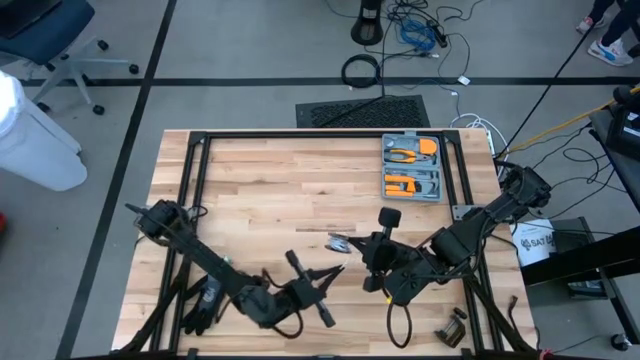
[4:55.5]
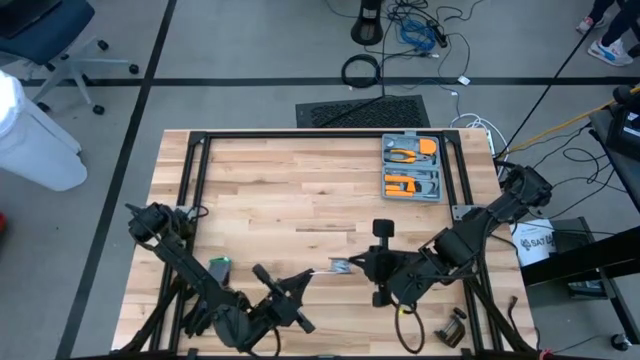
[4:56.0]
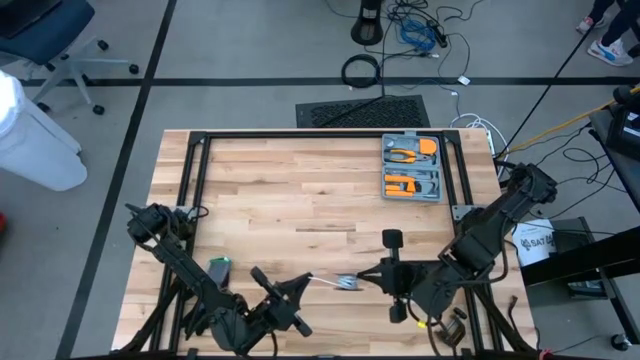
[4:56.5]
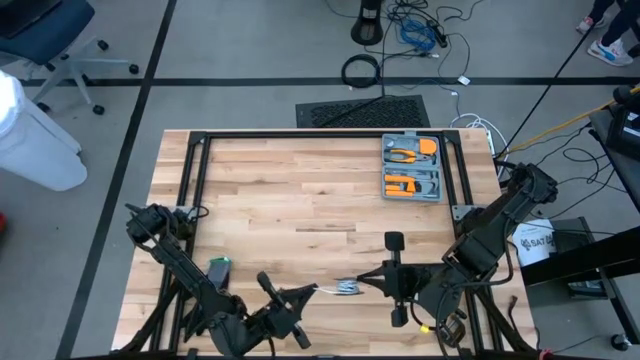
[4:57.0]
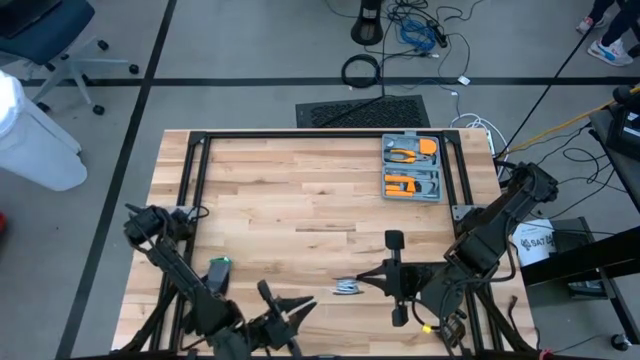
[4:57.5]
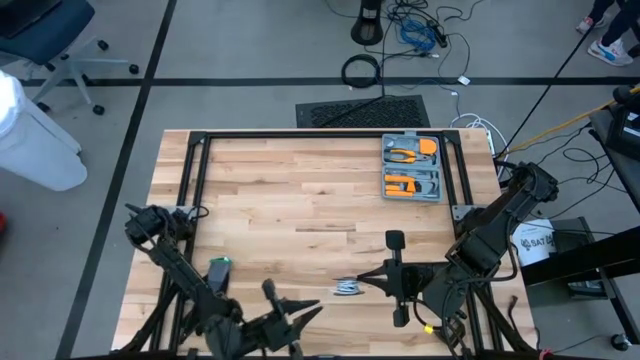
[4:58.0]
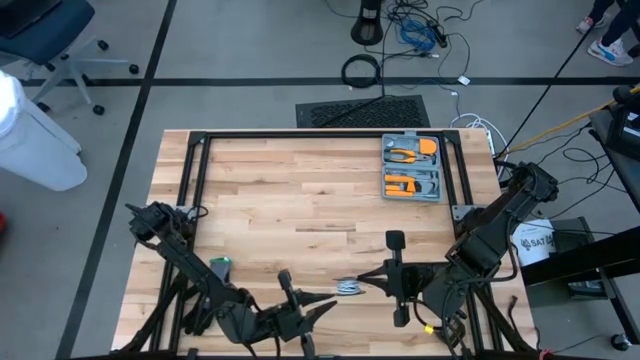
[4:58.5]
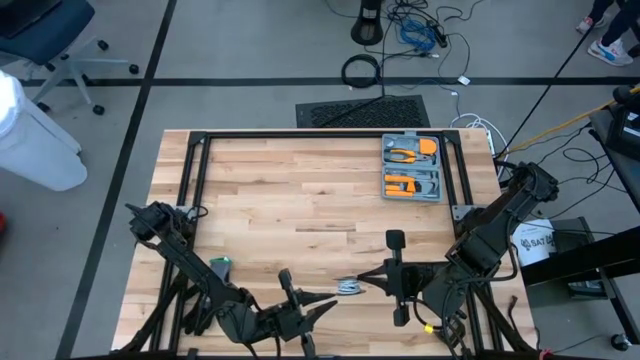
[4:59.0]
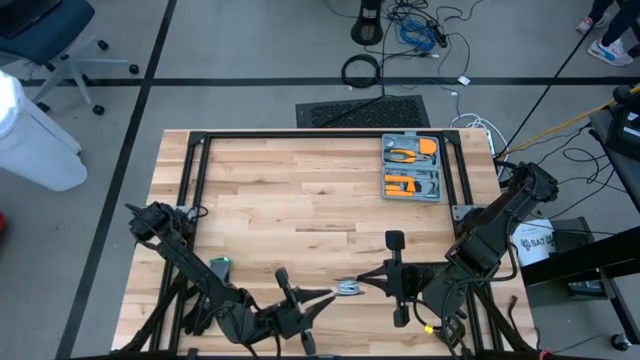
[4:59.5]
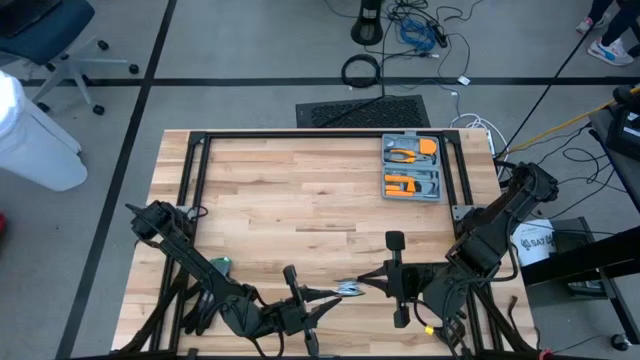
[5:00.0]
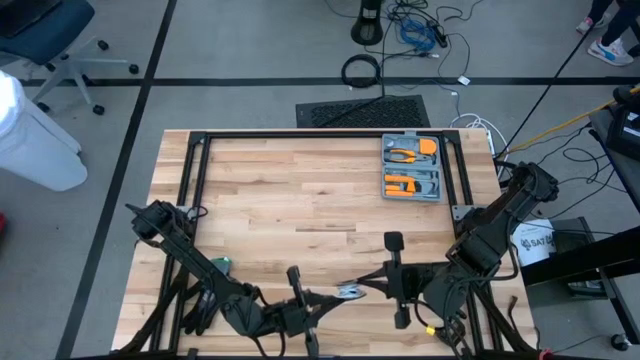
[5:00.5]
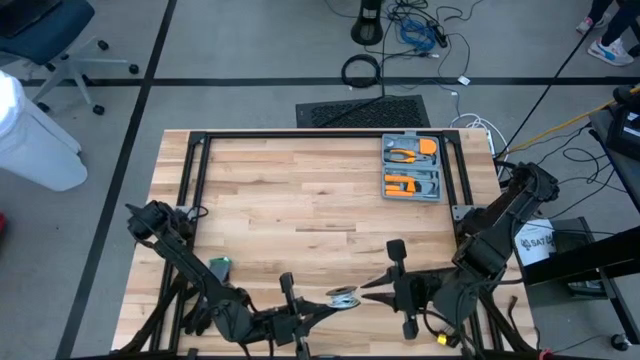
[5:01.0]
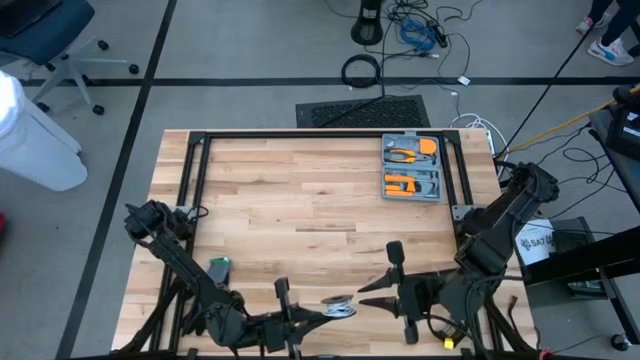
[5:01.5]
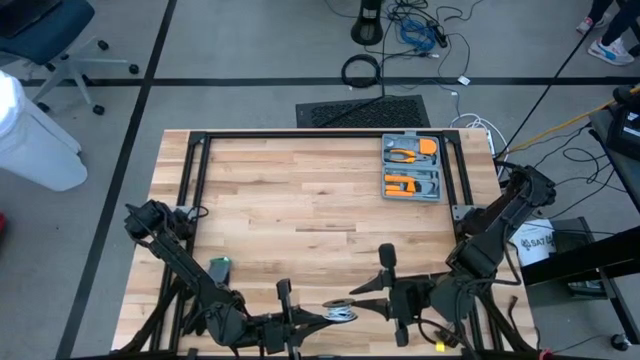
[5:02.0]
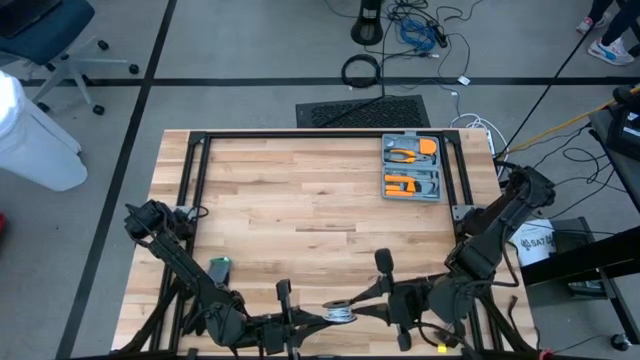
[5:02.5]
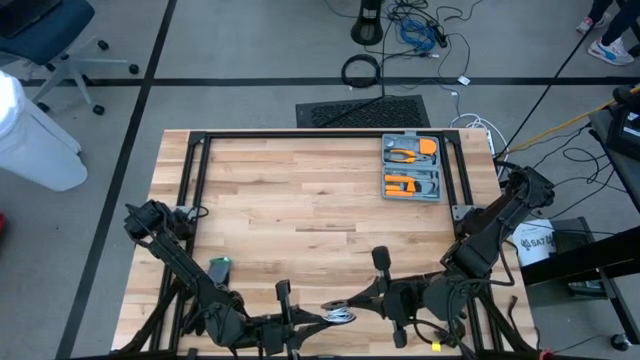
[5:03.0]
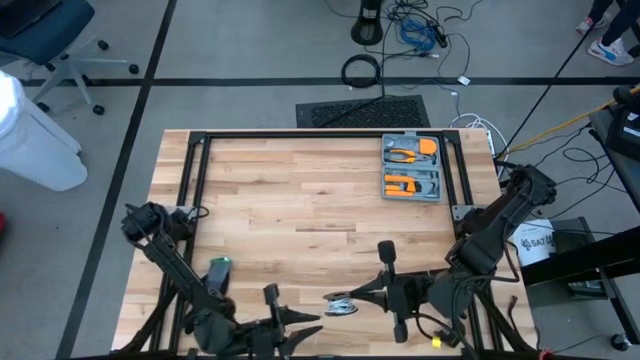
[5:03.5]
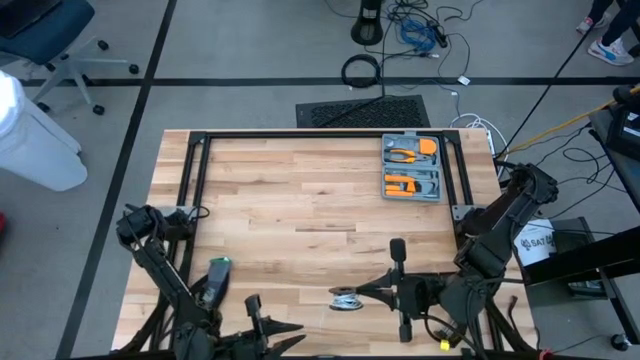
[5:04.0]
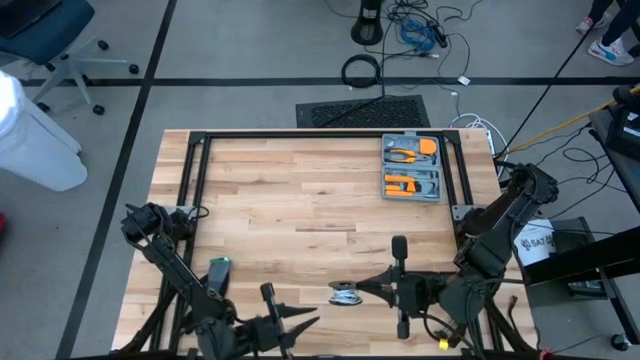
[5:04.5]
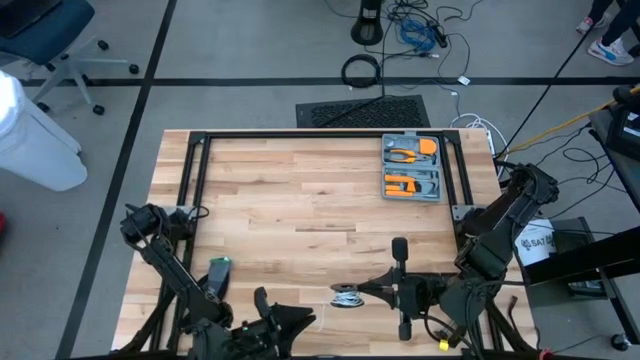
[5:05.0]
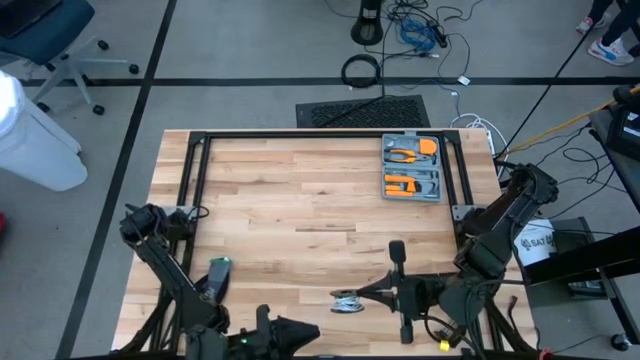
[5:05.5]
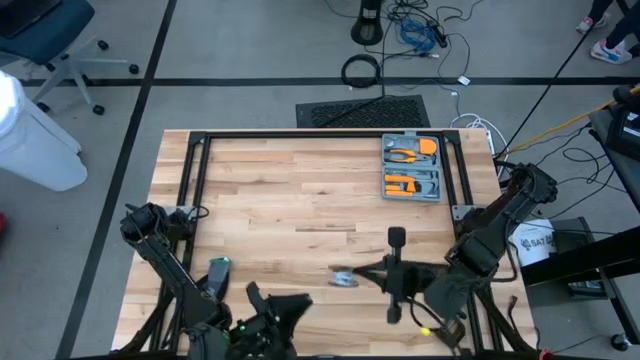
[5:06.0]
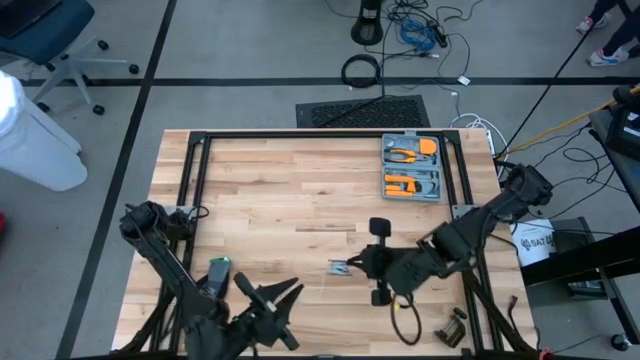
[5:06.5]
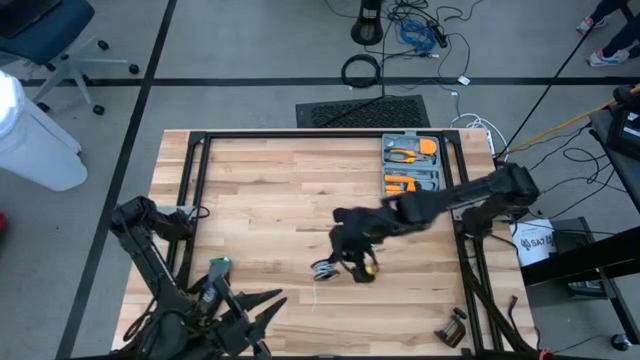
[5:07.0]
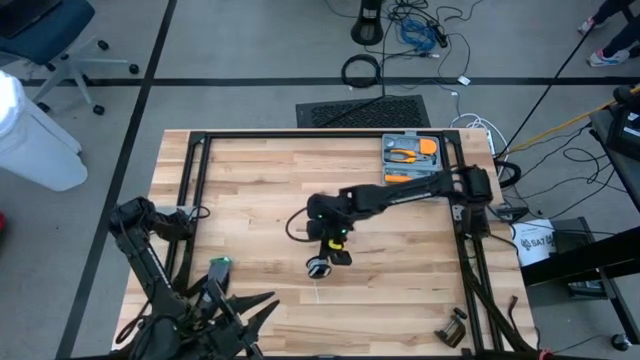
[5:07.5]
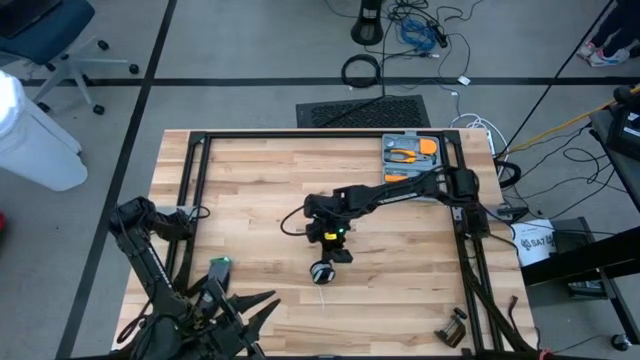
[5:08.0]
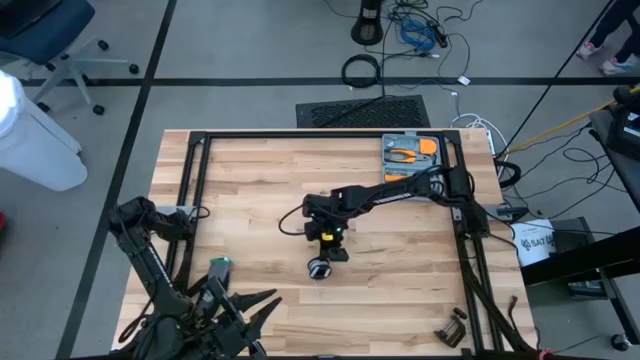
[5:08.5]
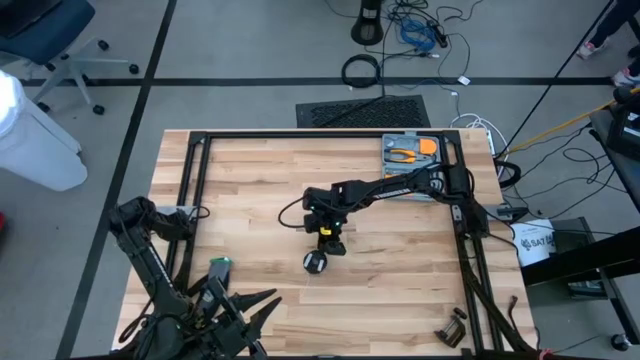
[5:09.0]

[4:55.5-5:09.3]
Task: Coil cords
Coil the white wire onto the spool

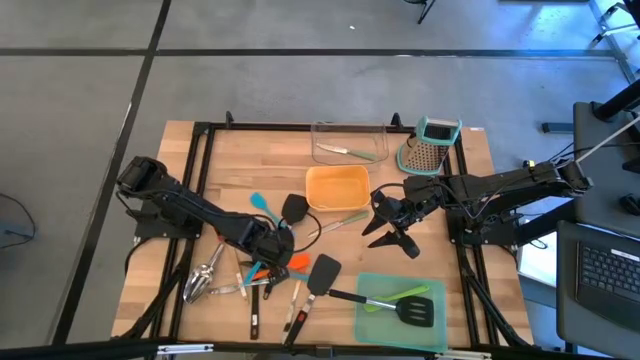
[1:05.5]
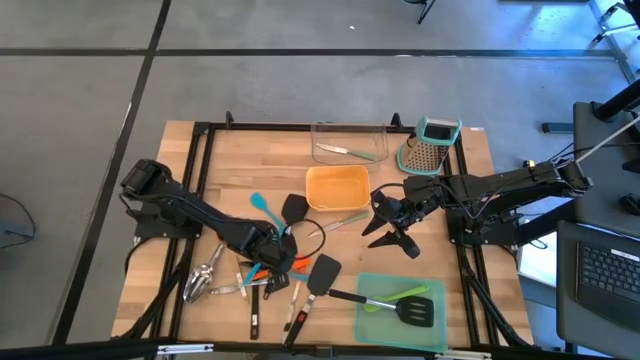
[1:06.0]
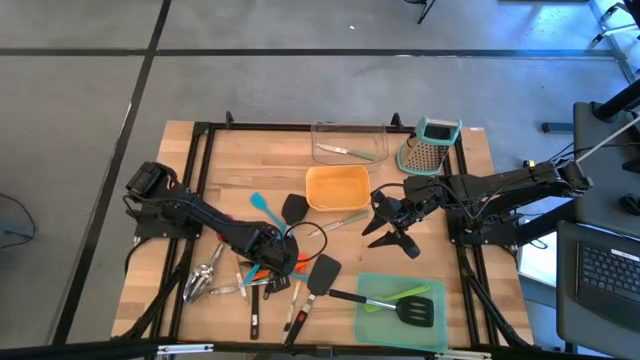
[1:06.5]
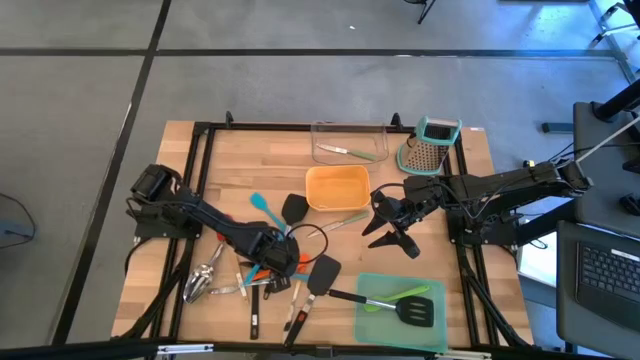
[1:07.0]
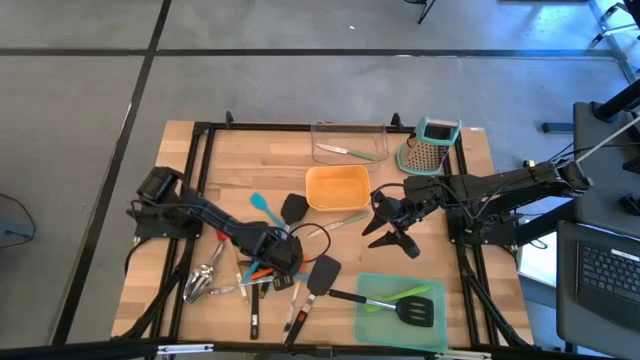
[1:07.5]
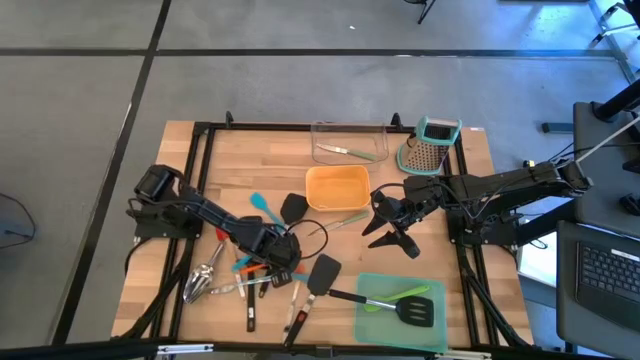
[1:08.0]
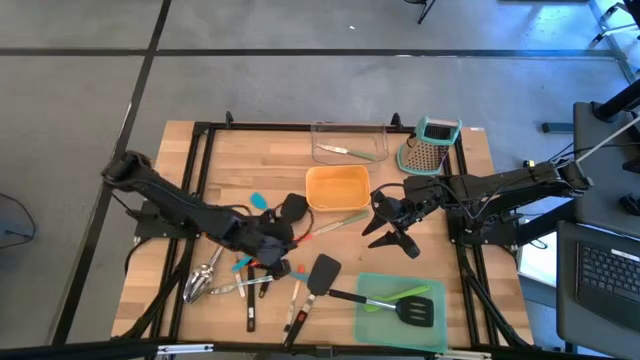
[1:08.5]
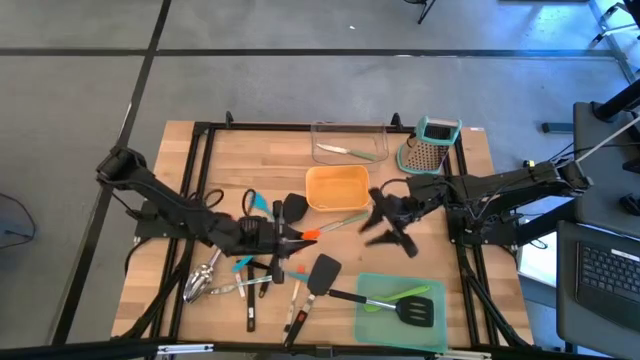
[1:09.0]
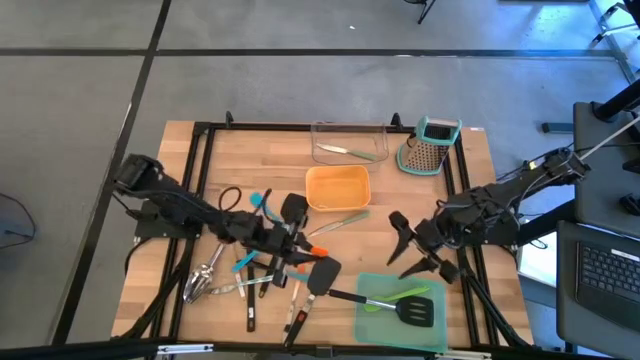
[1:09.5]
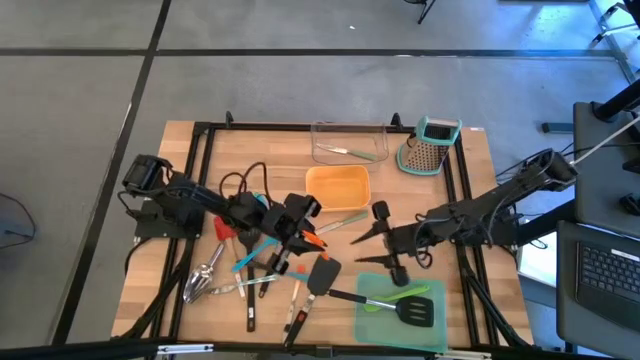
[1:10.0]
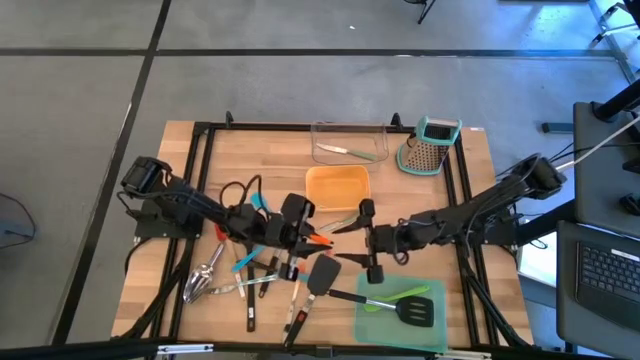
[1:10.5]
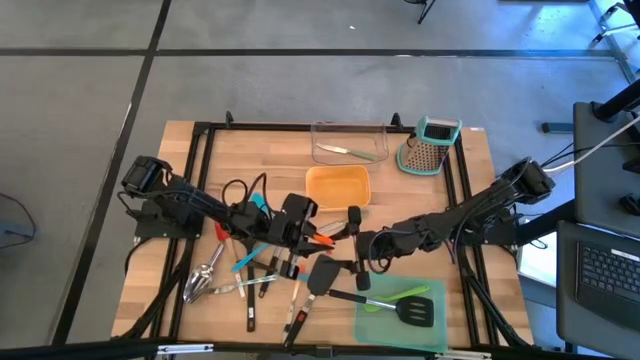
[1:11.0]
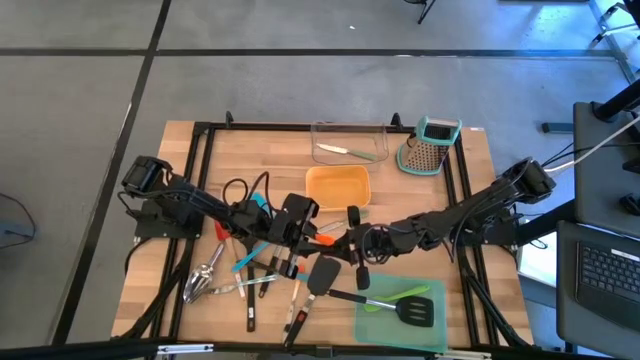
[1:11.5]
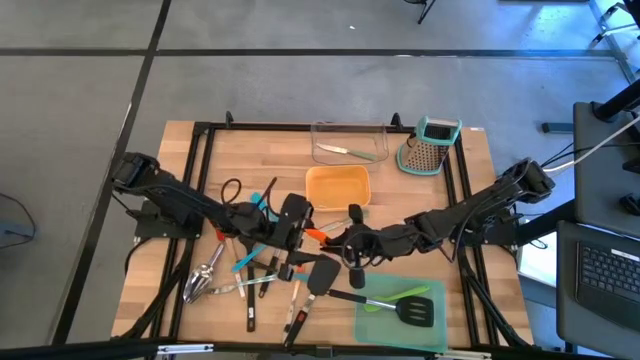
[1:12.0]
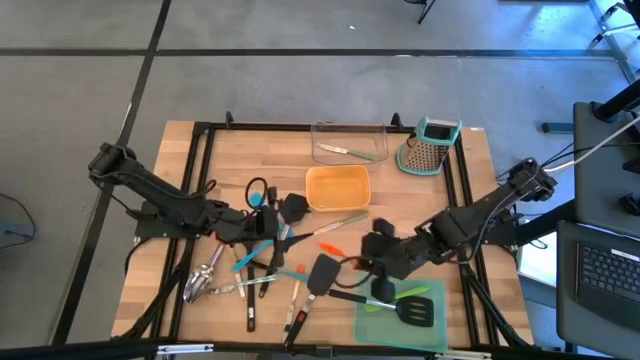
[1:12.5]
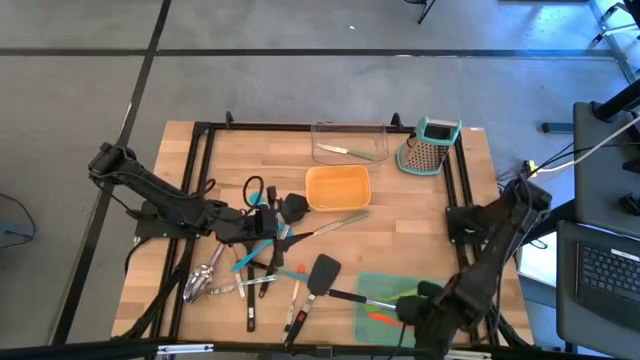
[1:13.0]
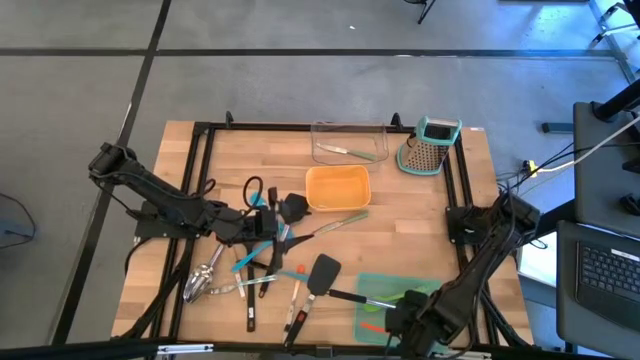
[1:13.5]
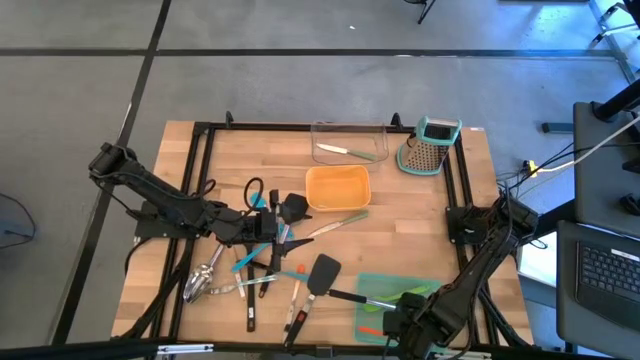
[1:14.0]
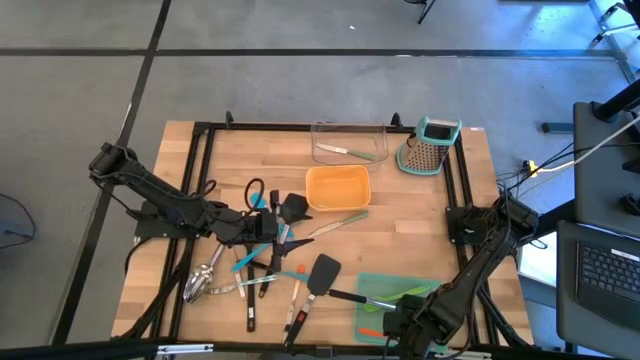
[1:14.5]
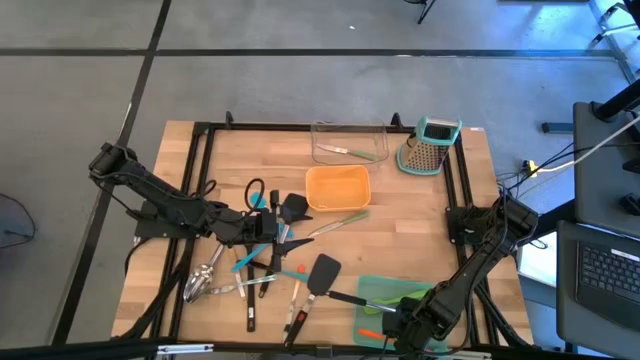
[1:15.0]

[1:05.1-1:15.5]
Task: Pick & Place Kitchen Items
Put the orange silicone spatula into the green bin
